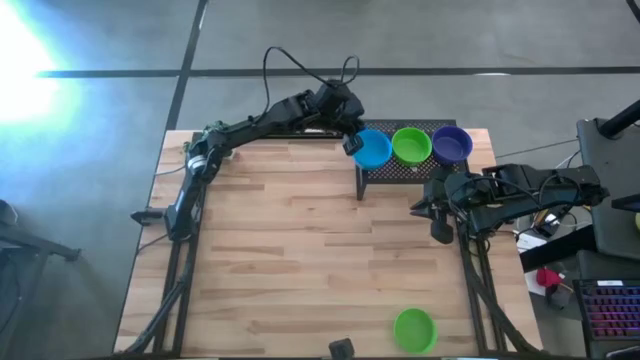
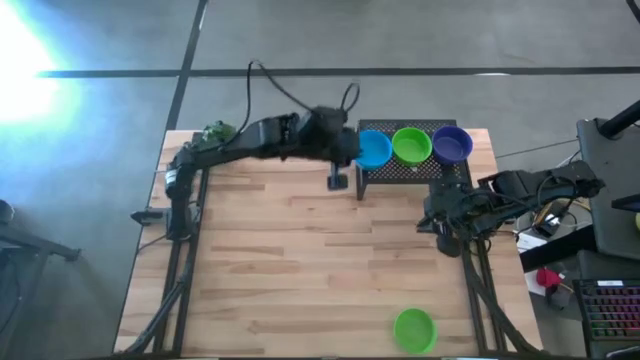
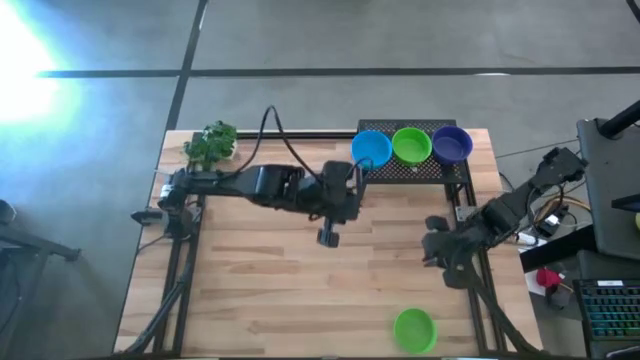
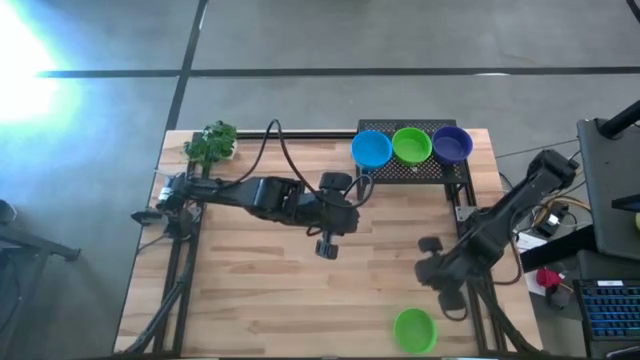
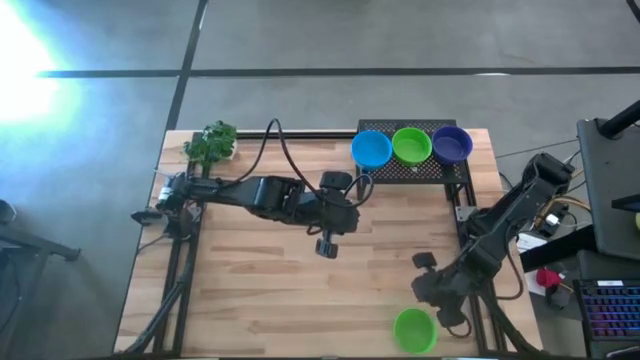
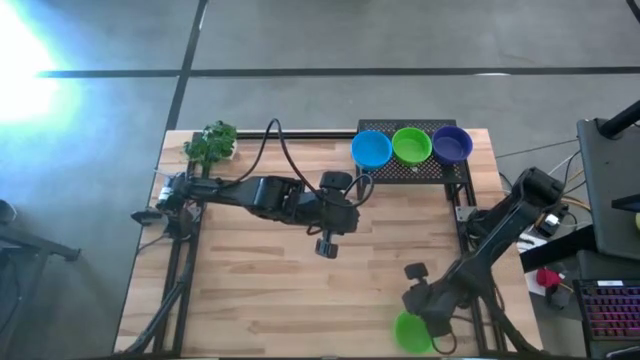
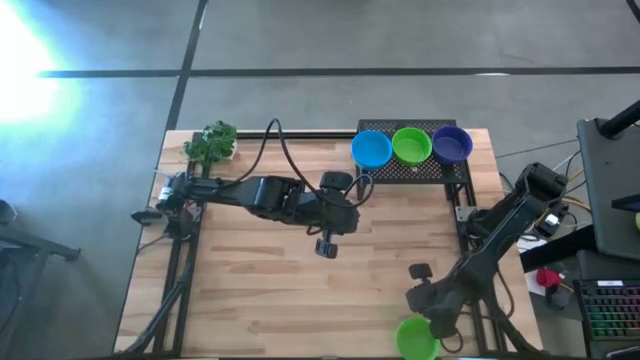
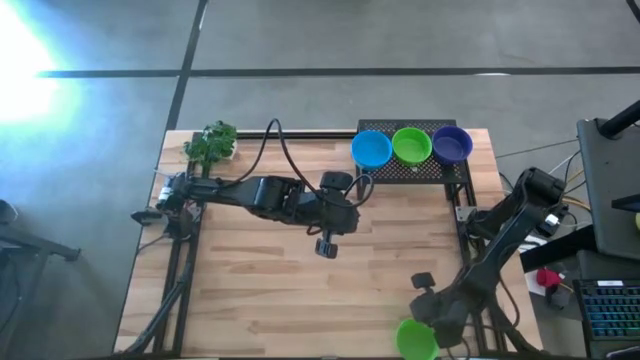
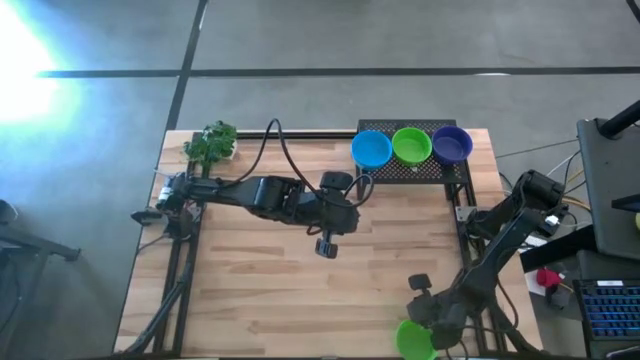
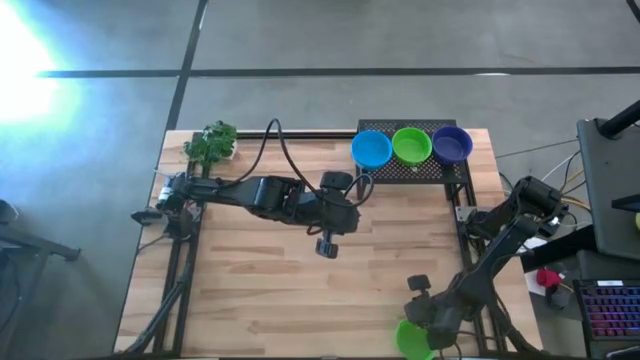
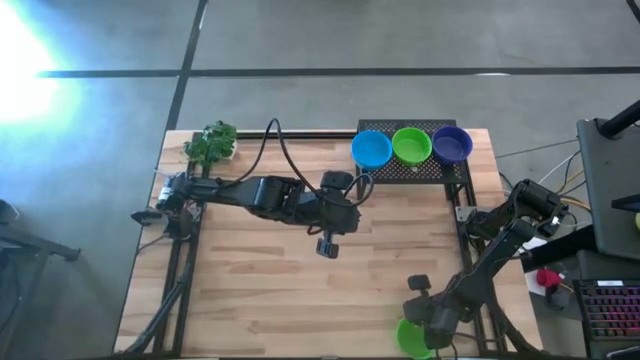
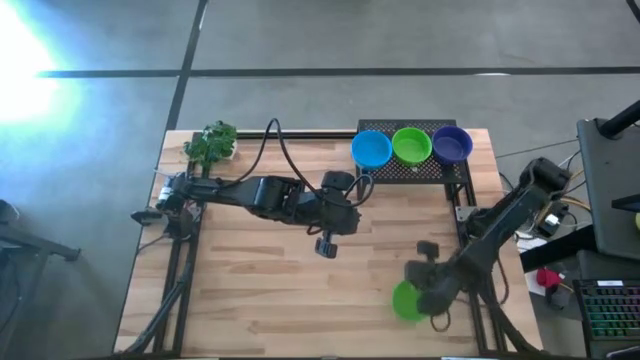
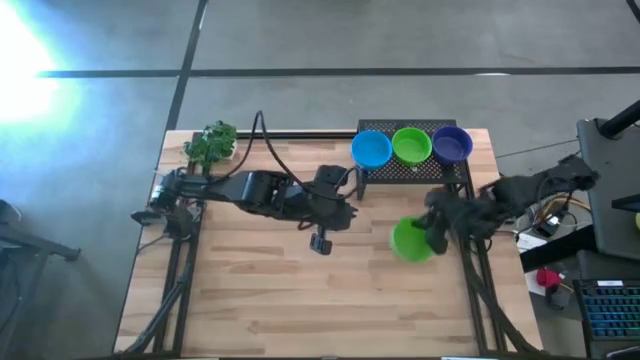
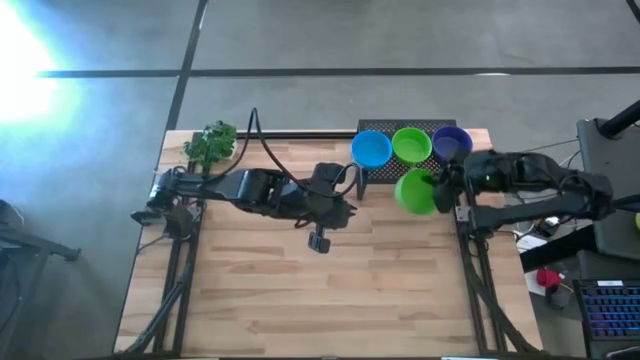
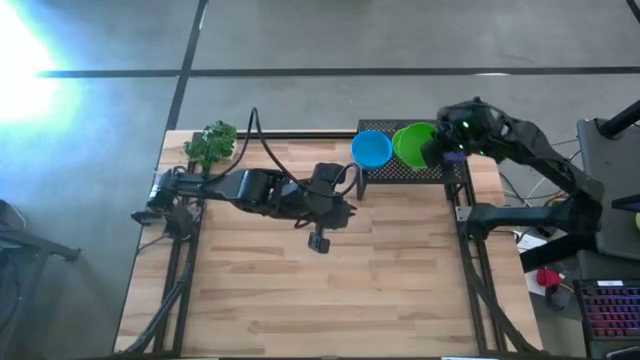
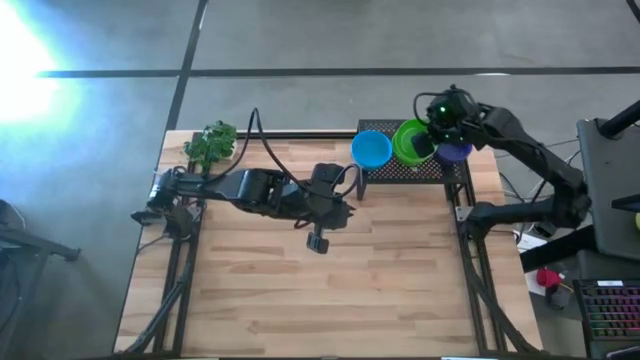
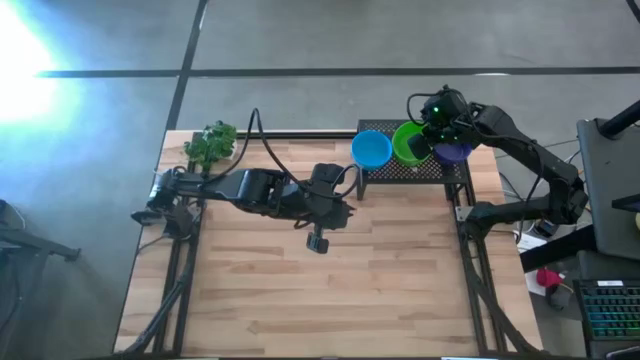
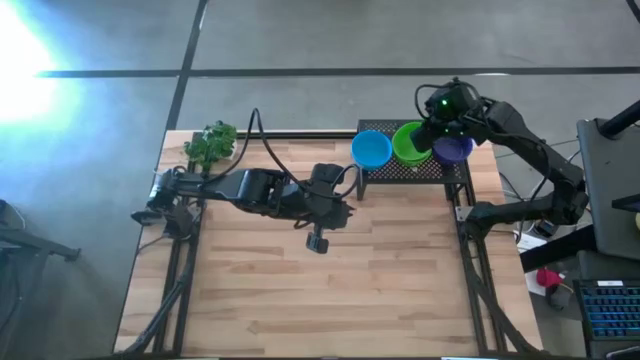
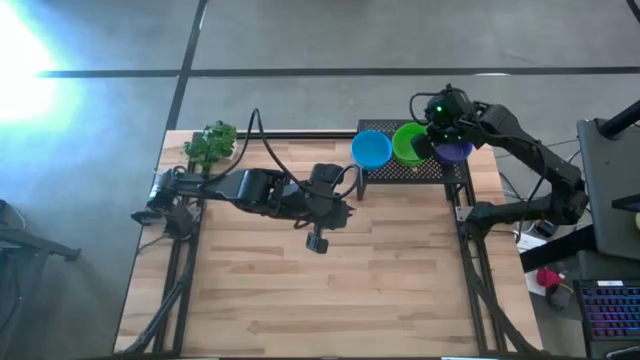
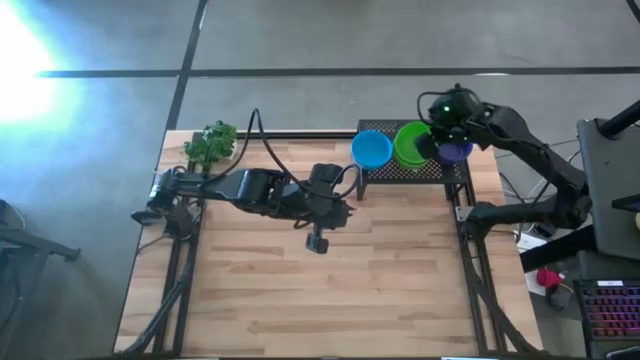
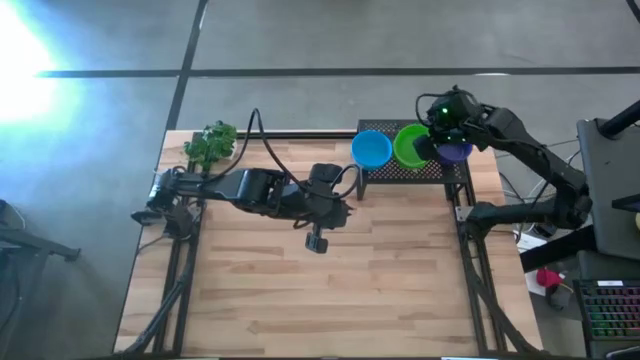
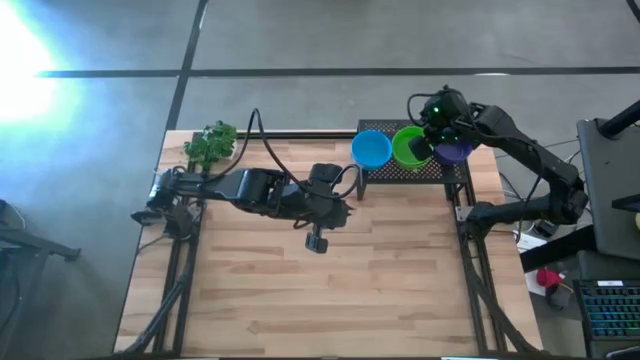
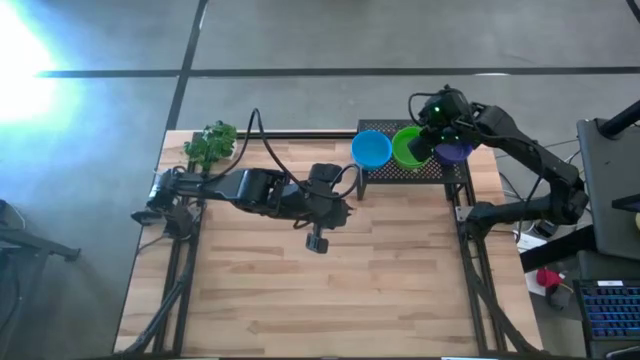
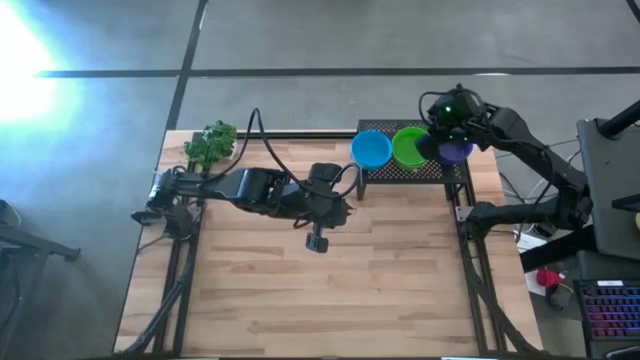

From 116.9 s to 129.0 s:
Task: Pick & Place Mini bowls
Stack the green bowl on the stacked green bowls on the shelf

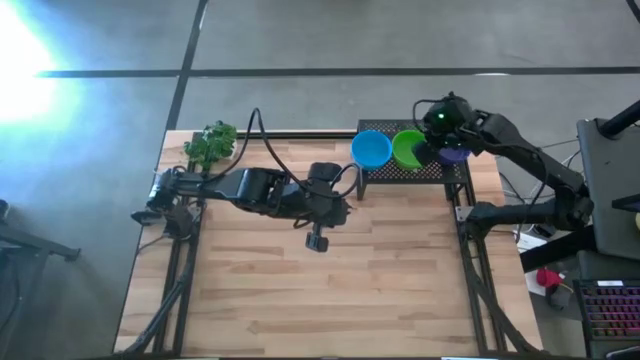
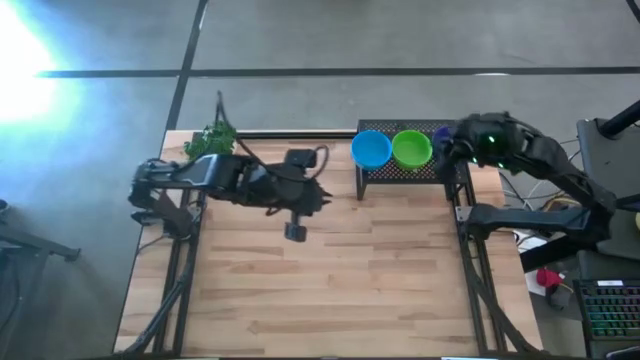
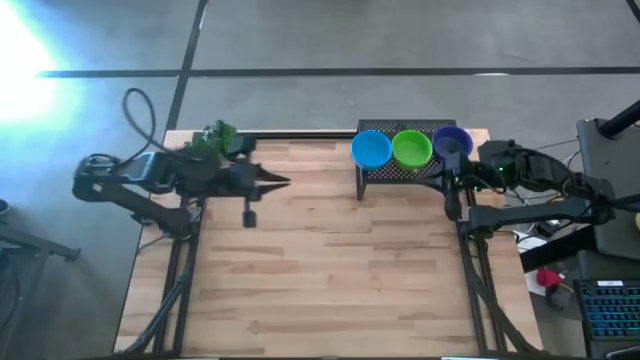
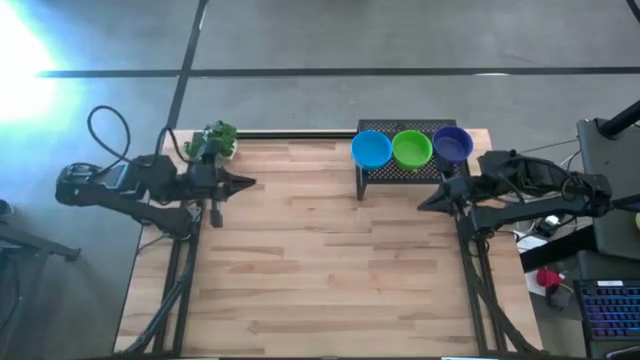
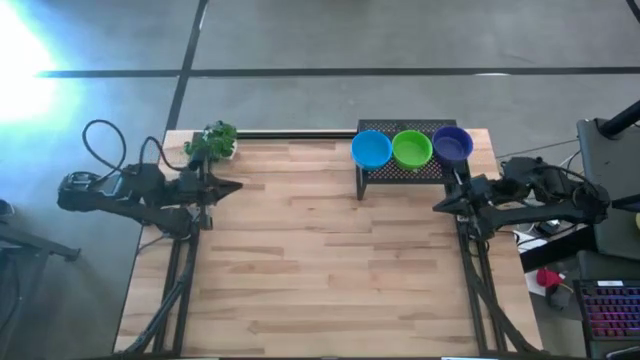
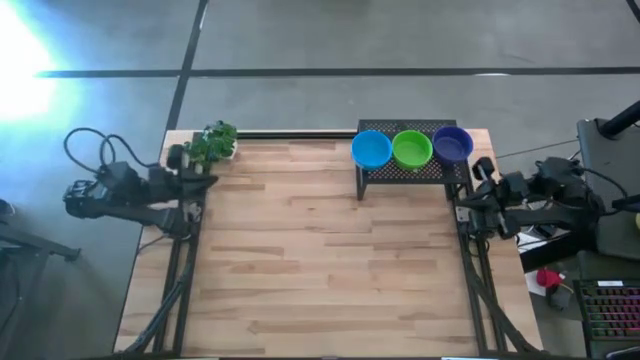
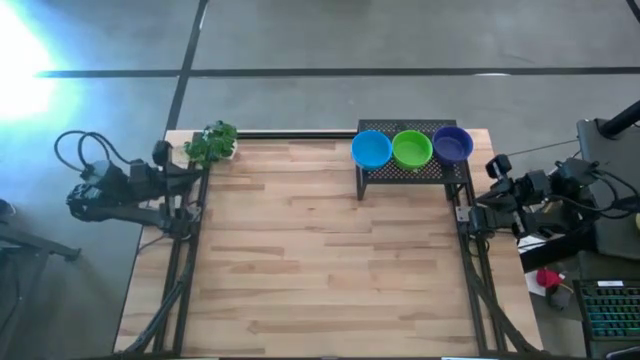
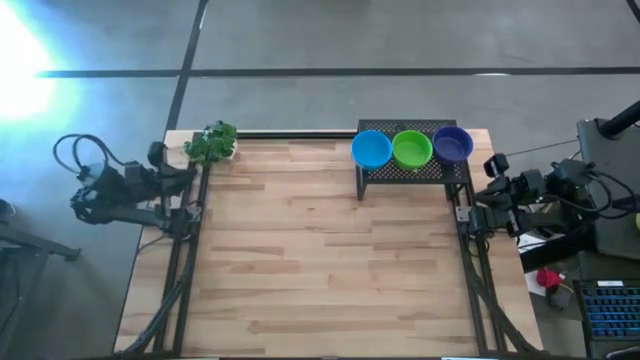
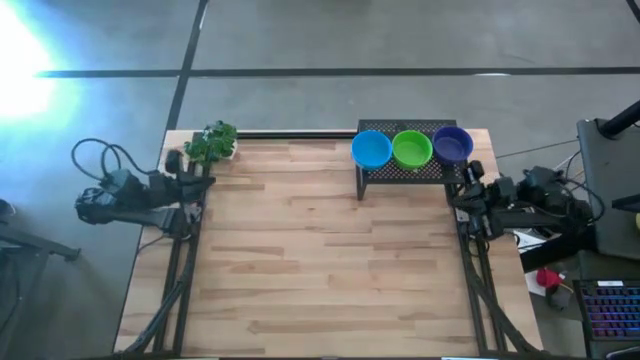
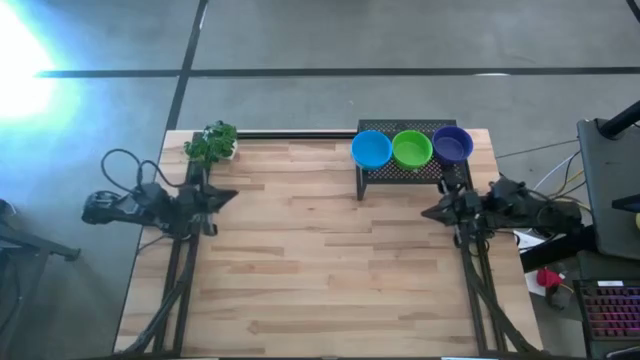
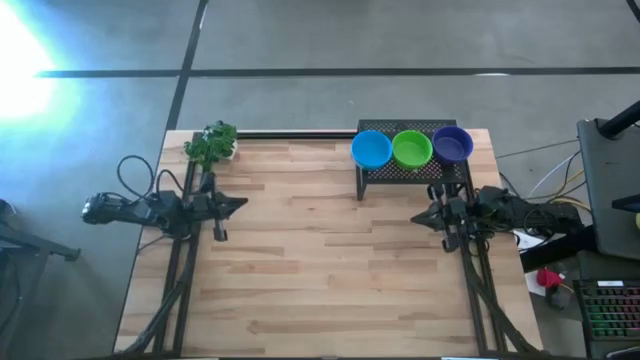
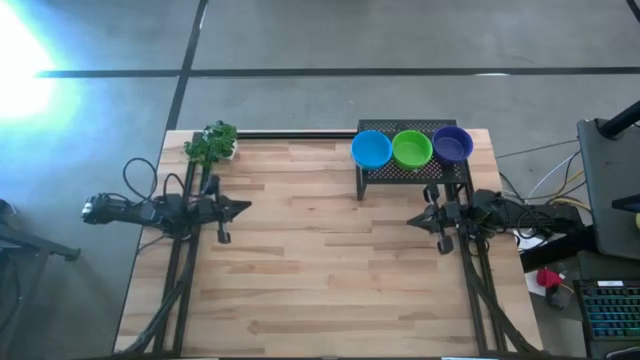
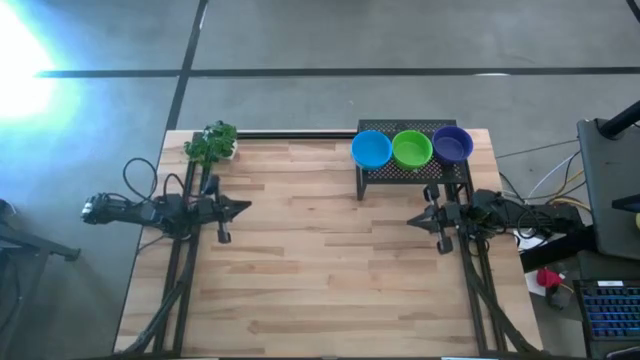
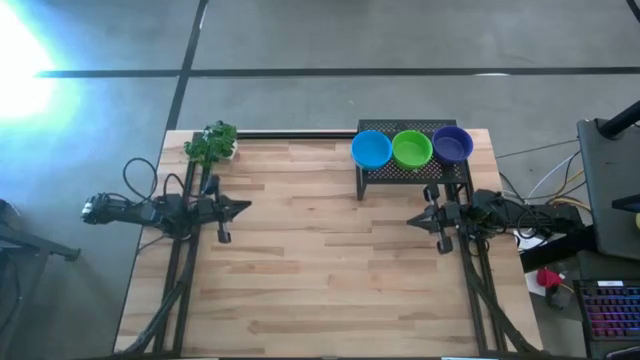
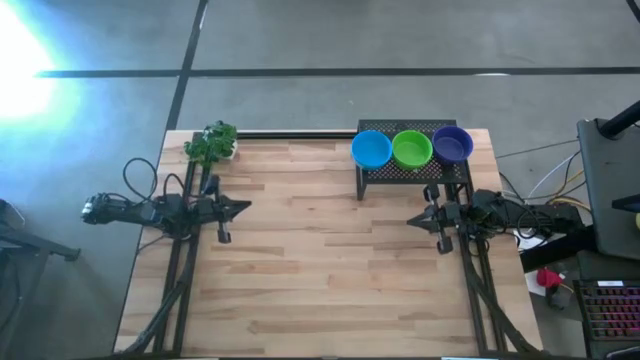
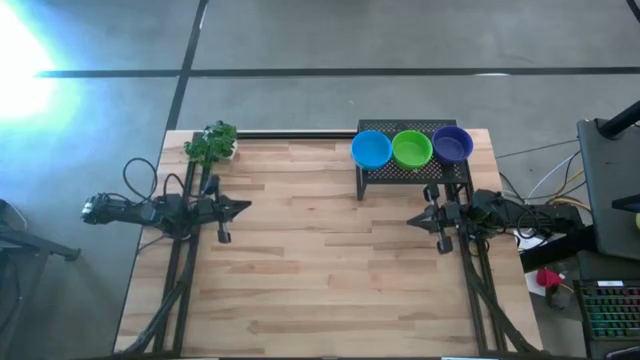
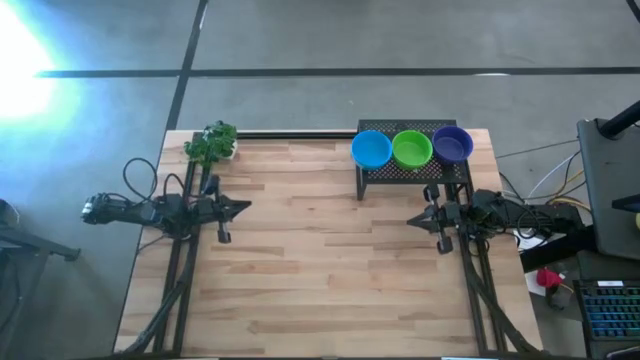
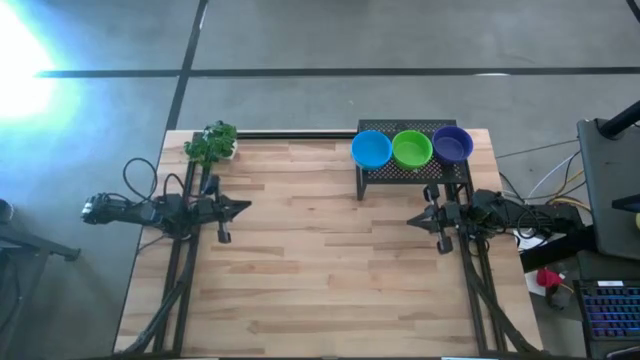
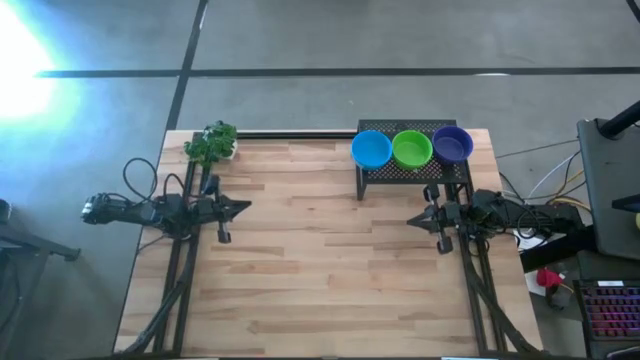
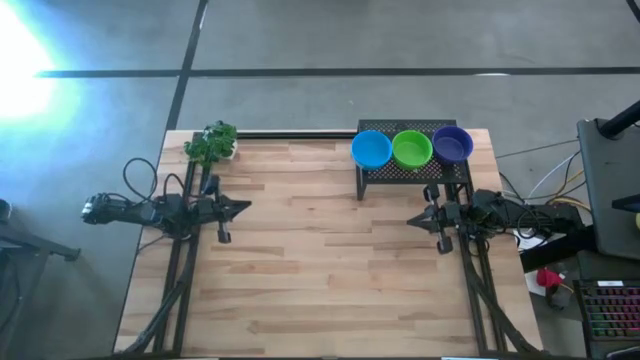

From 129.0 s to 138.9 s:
Return to Home Position
